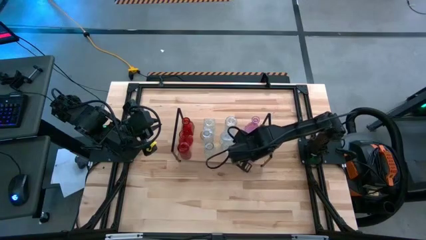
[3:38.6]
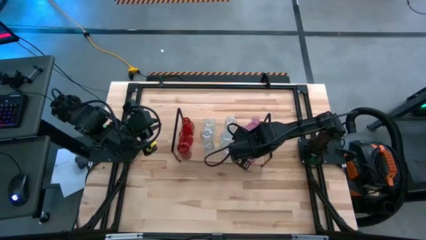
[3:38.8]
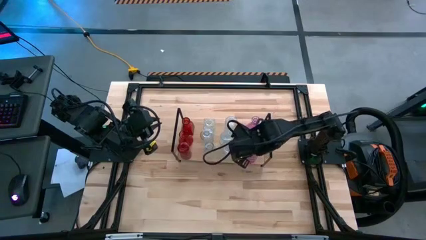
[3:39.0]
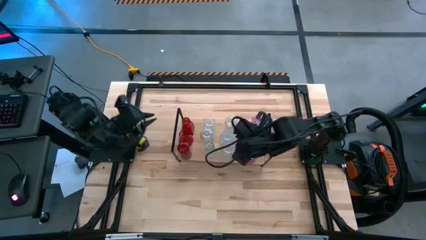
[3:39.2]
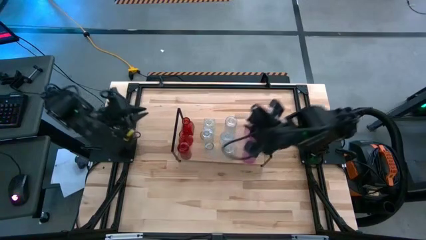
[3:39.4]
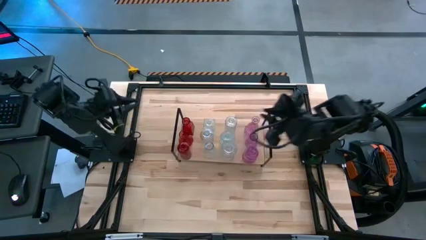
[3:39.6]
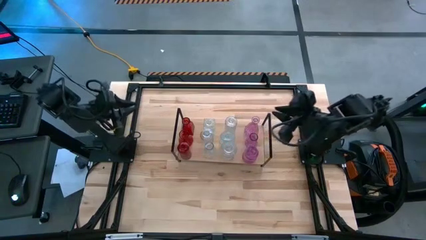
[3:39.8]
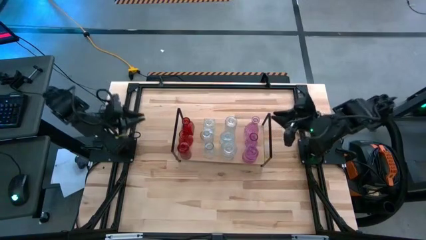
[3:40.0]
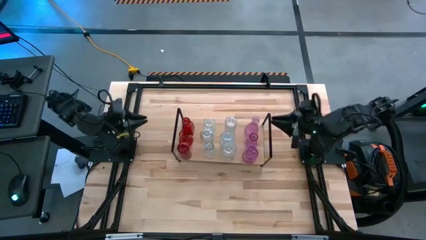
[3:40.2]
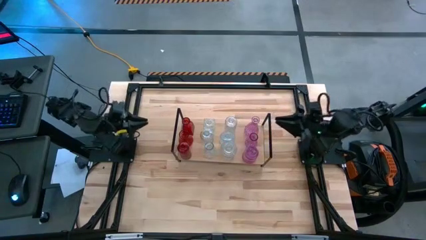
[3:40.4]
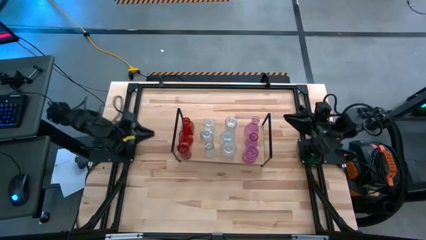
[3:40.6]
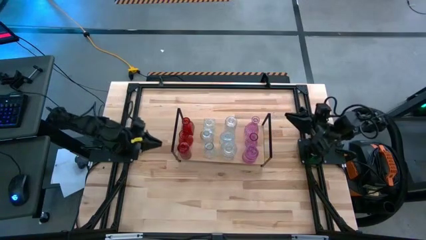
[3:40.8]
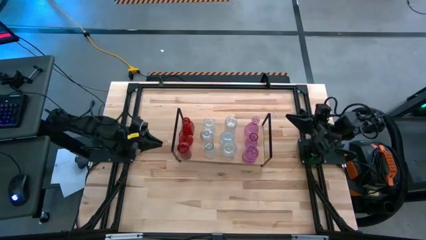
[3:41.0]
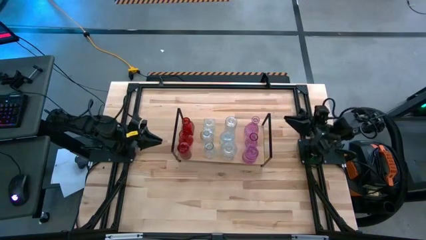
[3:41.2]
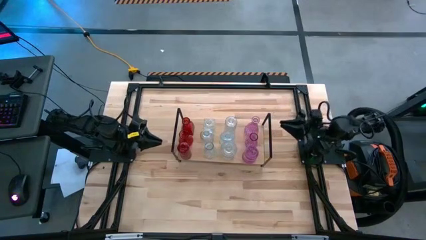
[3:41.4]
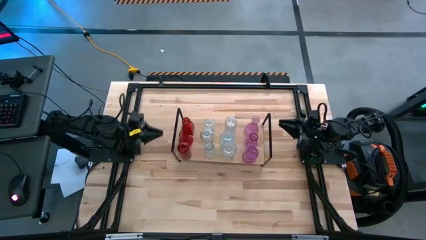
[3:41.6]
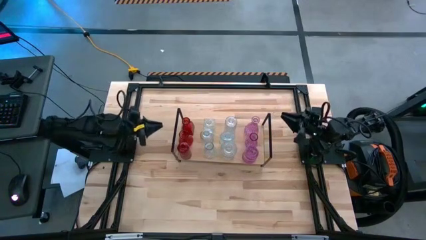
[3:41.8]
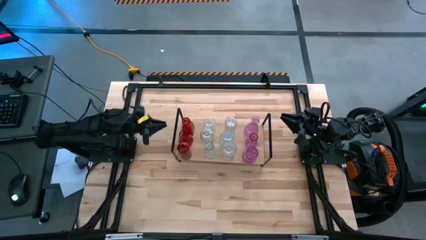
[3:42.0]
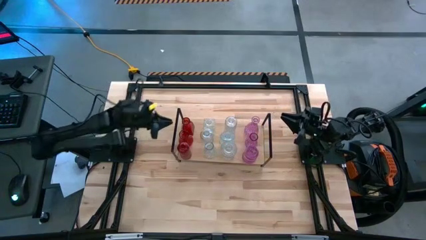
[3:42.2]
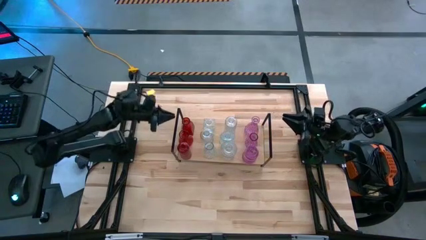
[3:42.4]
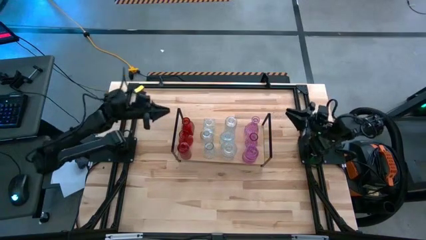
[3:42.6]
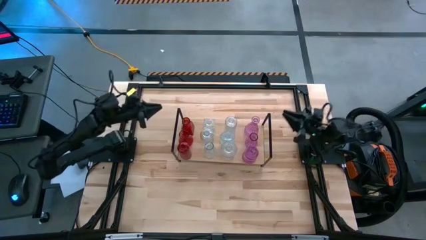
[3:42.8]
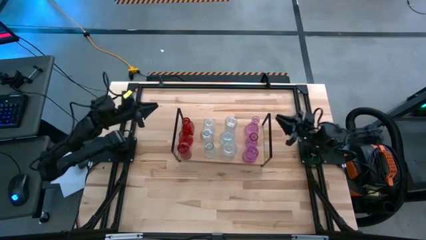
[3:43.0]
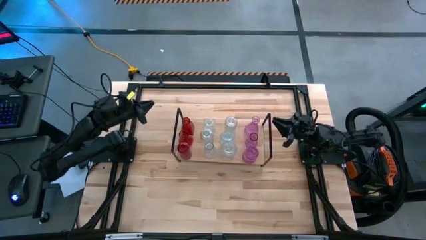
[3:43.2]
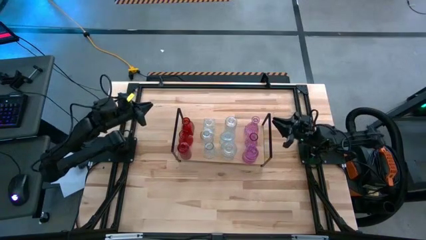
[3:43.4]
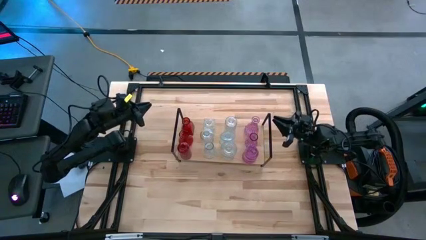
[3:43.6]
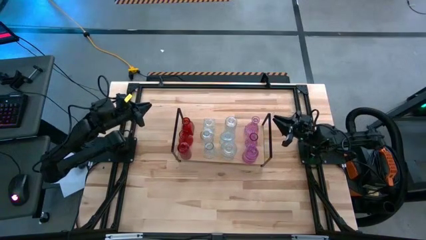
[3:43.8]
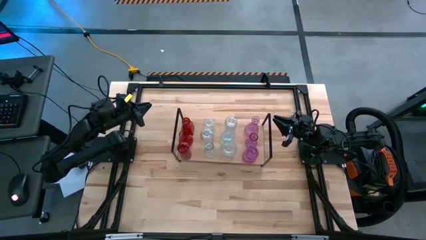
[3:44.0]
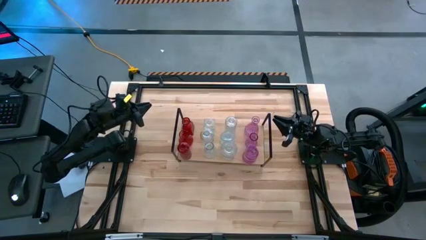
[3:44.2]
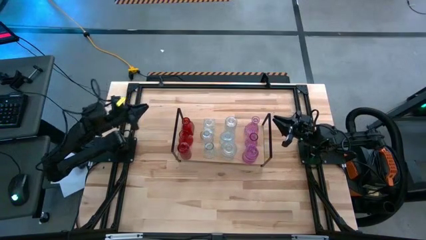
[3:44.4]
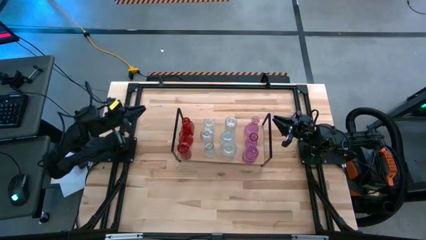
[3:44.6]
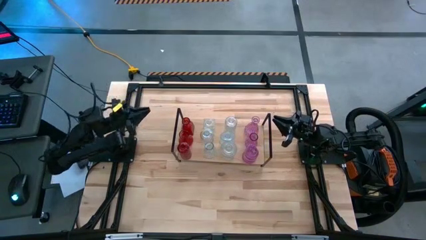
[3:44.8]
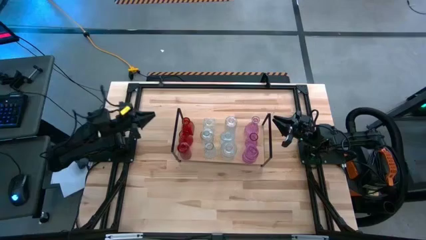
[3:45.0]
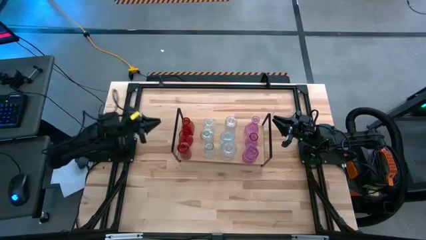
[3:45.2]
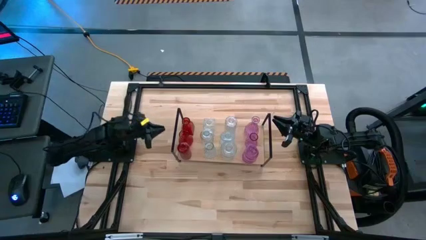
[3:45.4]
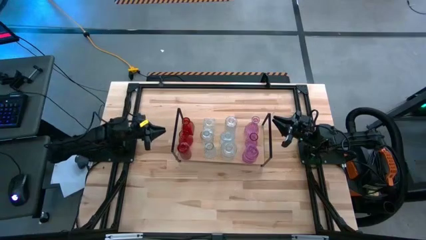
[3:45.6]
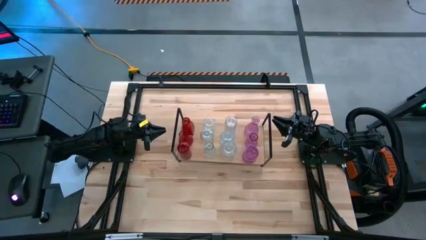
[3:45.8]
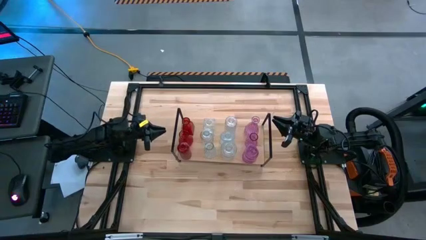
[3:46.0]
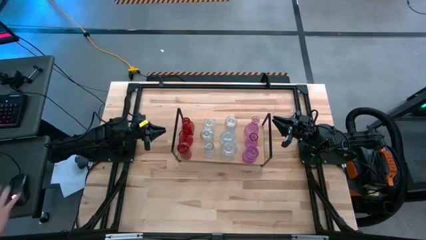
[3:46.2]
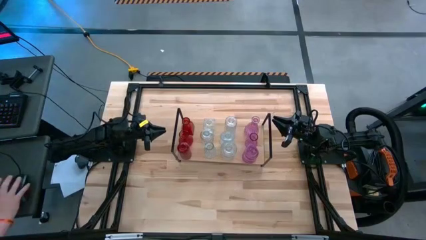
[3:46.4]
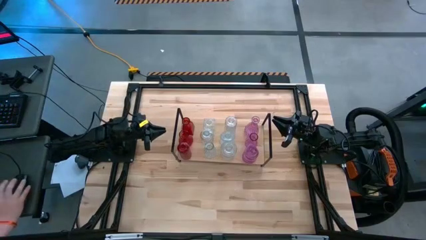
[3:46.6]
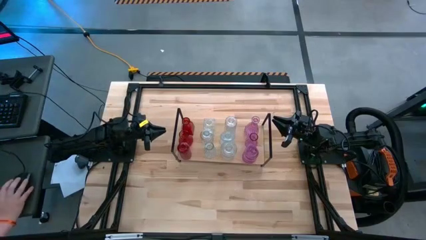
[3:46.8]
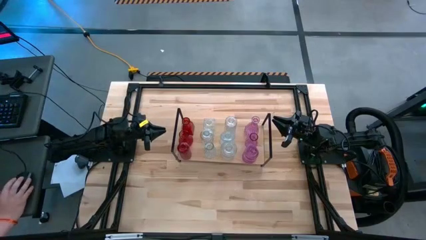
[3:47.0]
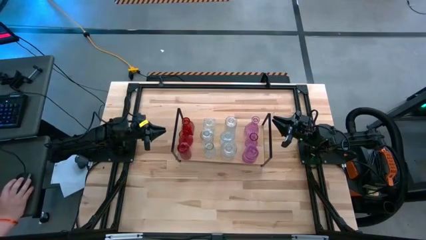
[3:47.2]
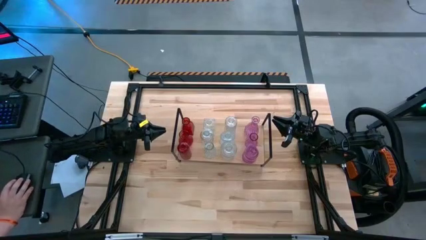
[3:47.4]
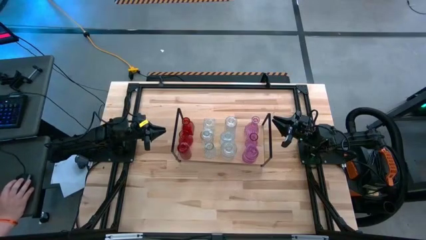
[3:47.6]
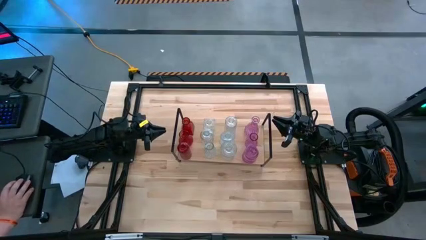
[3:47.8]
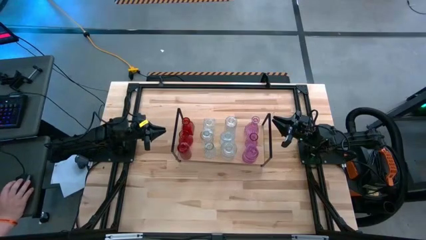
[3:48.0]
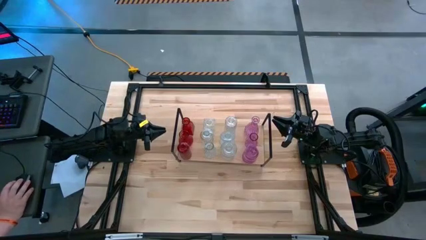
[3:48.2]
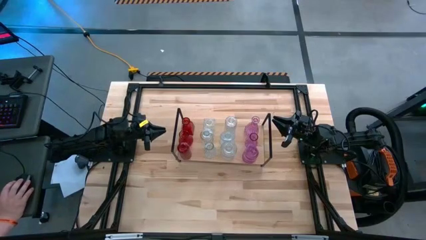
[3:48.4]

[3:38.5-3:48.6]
Task: sort vases onto shelf
Return to Home Position

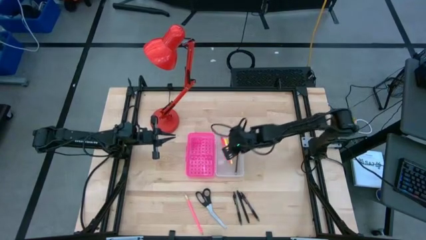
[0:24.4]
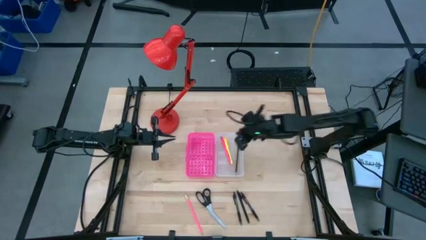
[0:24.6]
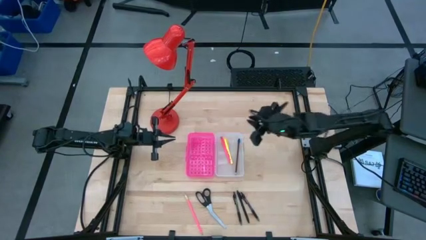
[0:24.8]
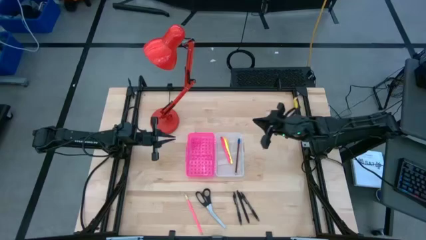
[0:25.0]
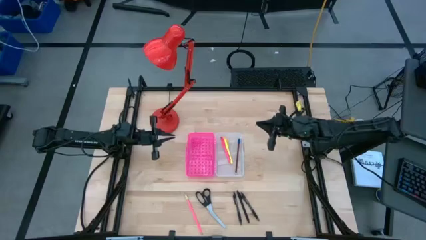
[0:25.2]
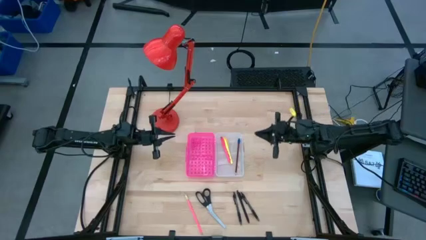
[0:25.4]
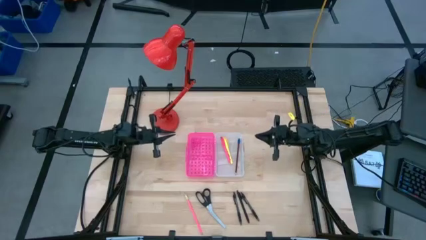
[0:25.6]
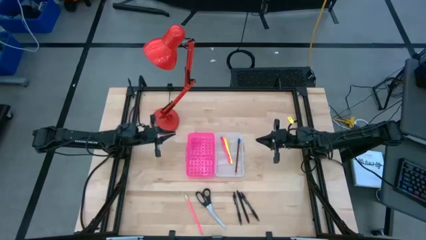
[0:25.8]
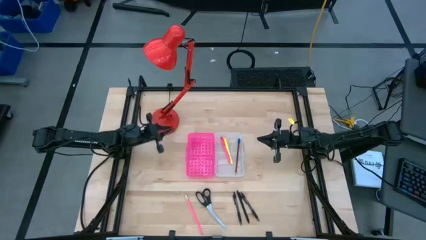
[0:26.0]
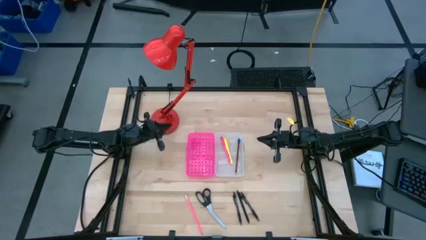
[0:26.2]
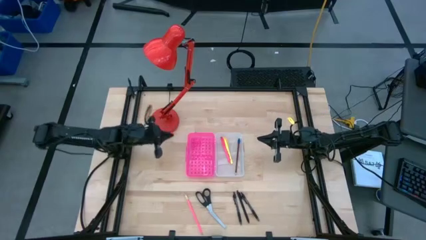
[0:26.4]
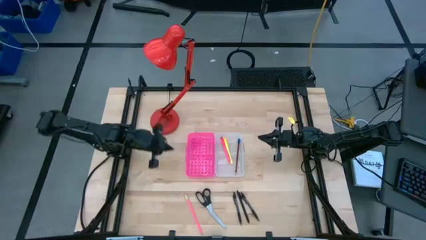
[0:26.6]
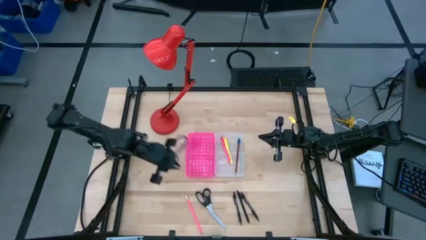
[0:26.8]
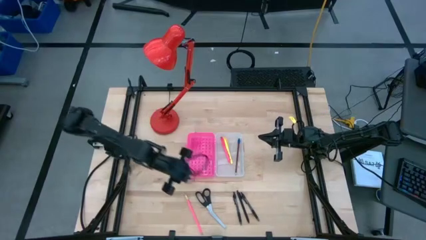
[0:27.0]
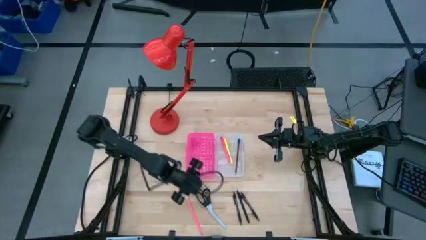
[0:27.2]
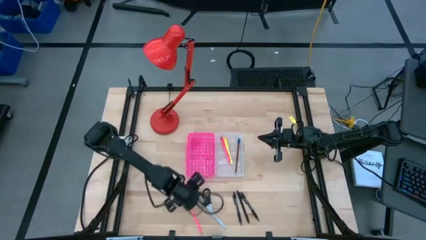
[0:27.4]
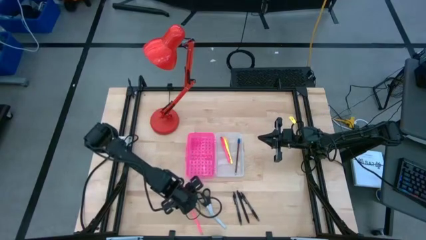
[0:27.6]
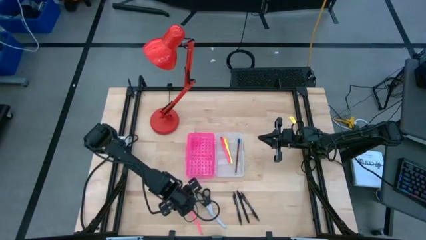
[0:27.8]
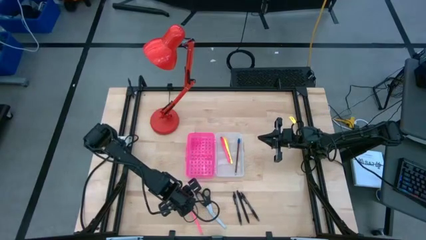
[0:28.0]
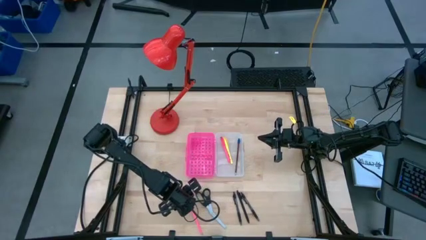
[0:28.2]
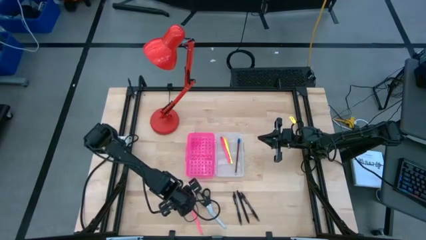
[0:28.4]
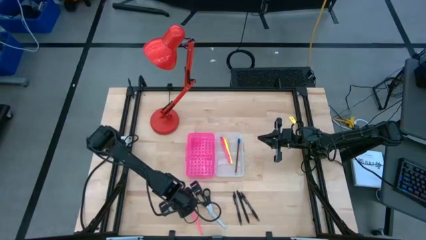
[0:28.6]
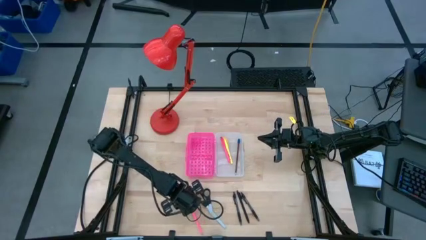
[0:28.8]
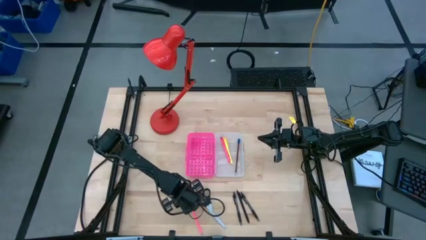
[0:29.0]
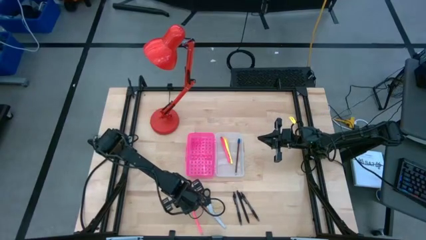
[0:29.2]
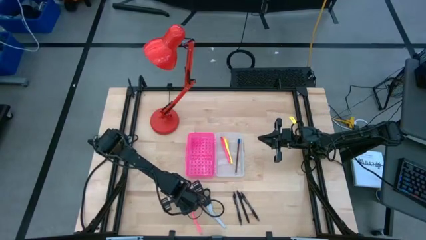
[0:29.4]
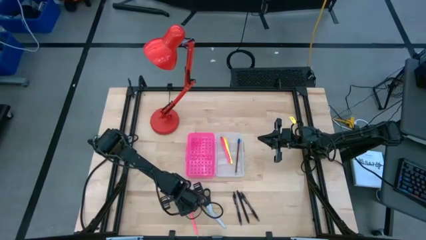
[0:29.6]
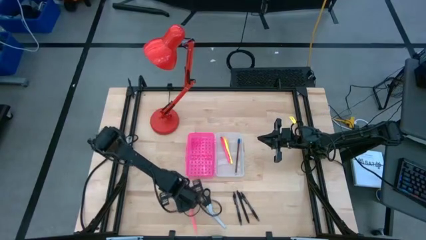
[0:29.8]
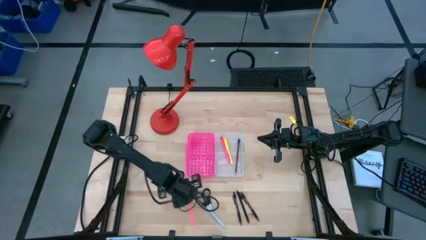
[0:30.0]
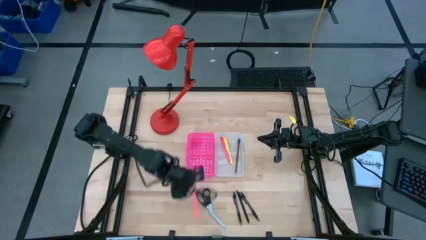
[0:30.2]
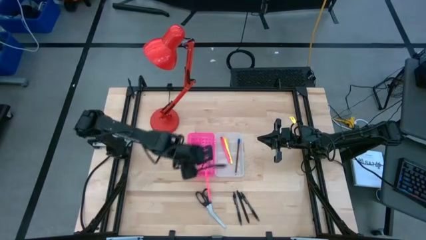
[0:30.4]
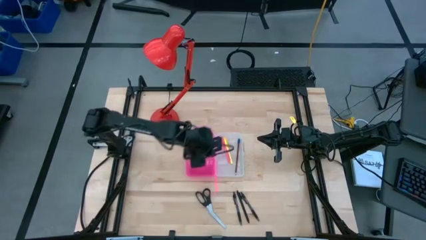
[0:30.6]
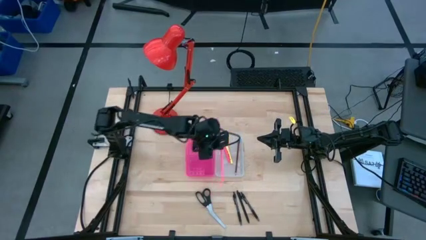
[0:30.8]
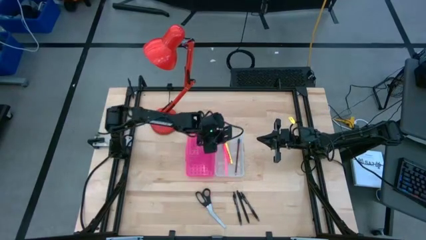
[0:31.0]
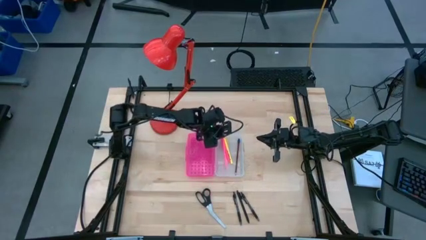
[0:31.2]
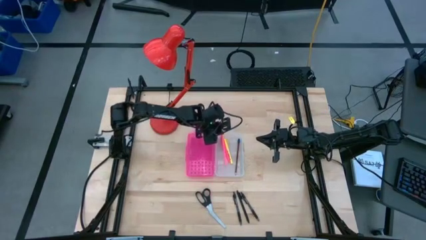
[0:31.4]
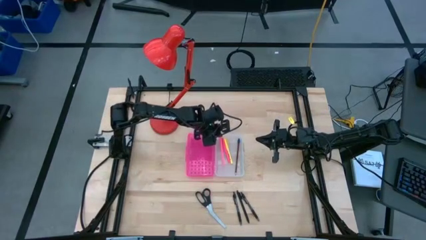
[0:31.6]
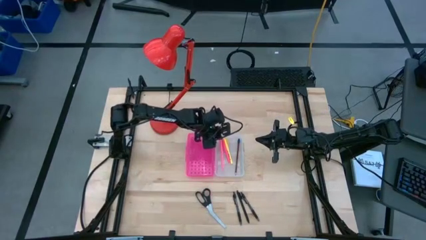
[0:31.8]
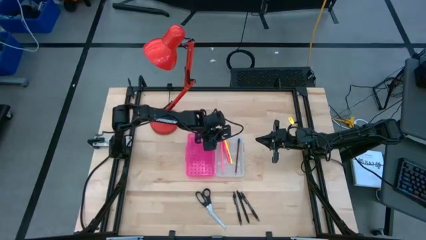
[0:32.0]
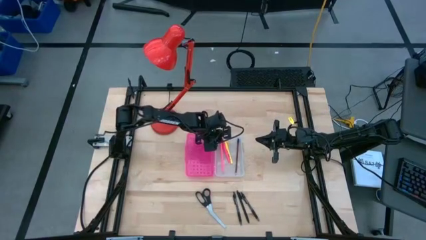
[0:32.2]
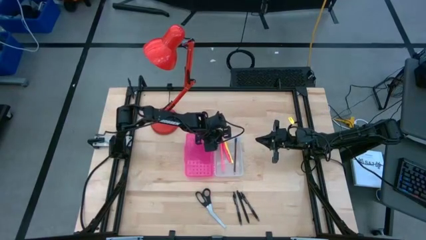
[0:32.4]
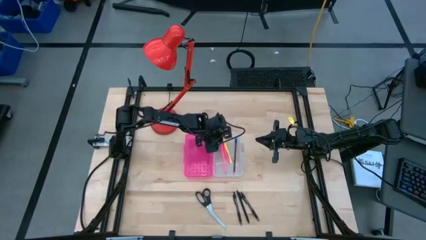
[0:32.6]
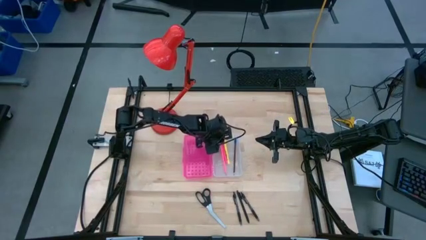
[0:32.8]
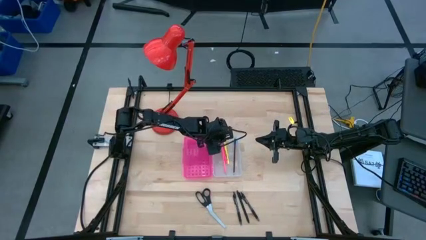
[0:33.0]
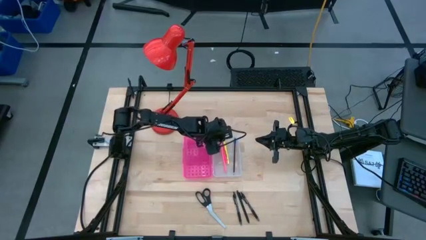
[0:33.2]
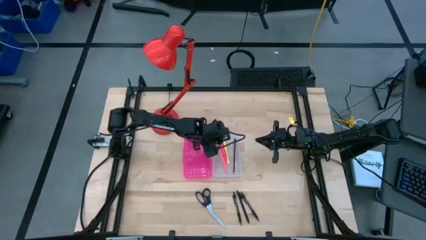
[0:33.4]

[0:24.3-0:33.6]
Task: Pick & place school supplies into a supply box
Put the pink pencil into the pink supply box
